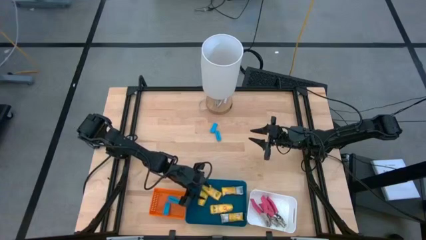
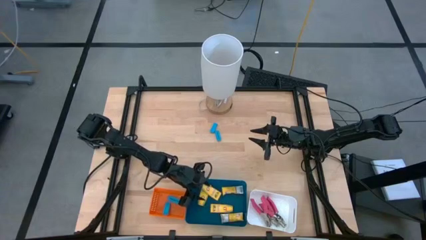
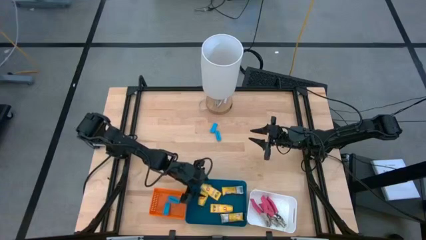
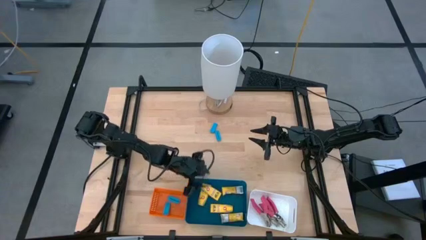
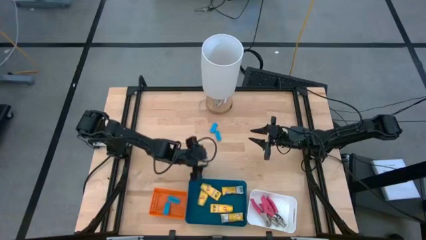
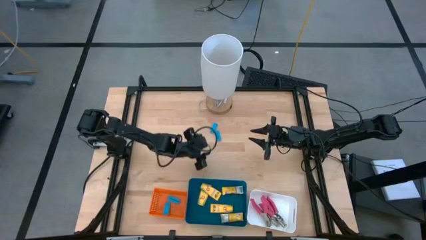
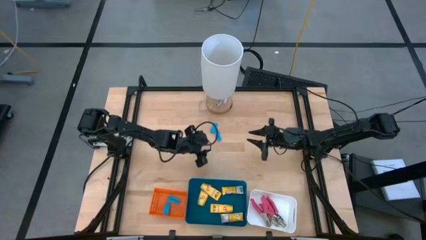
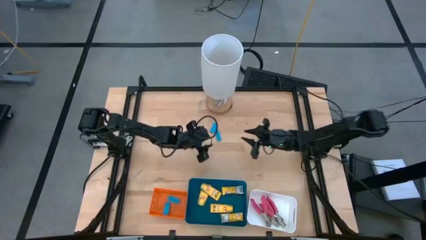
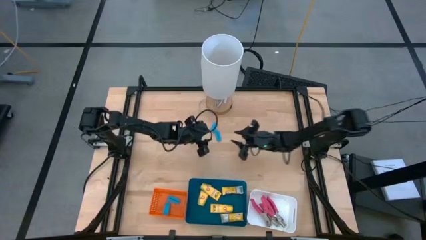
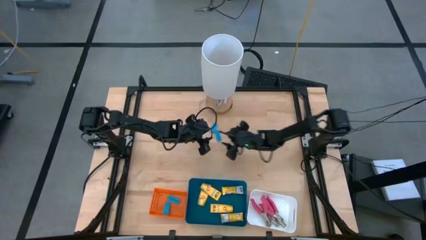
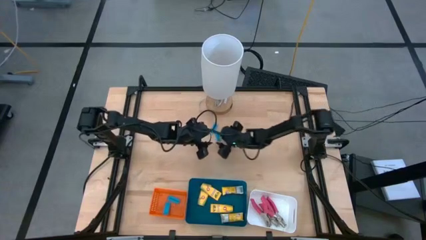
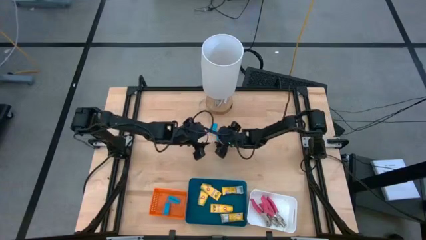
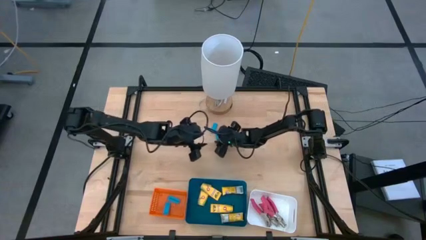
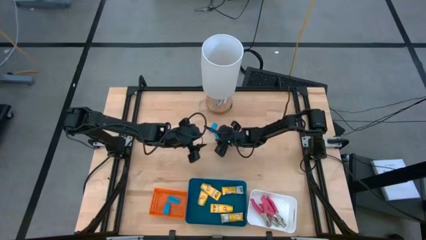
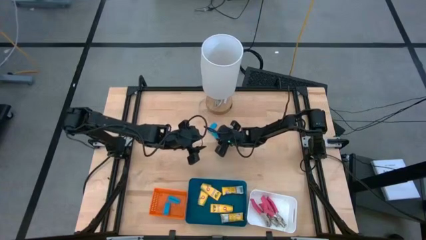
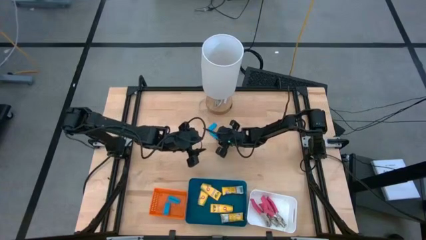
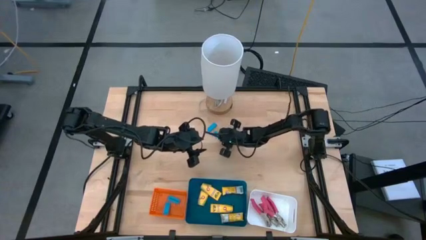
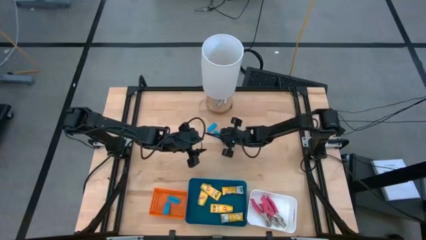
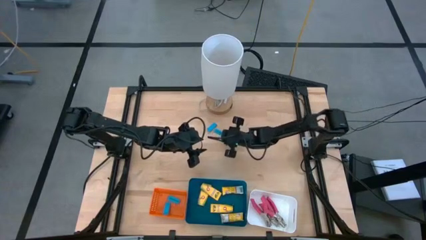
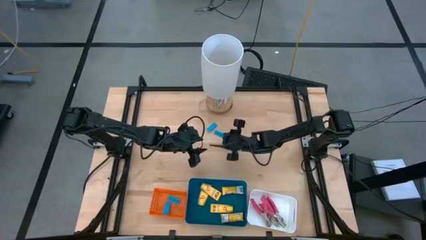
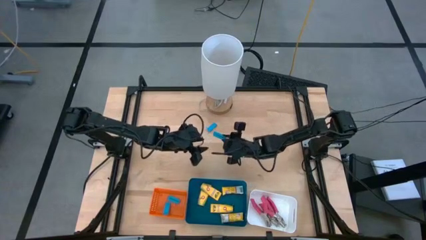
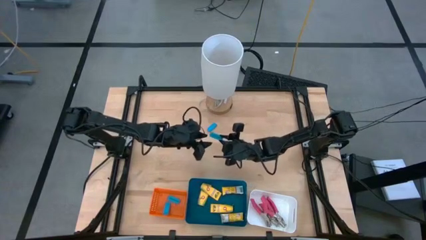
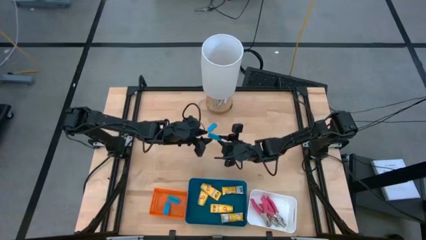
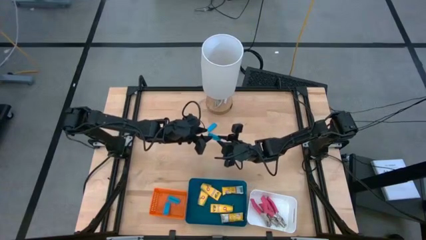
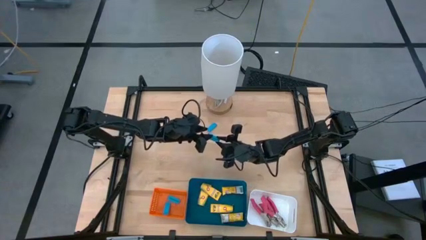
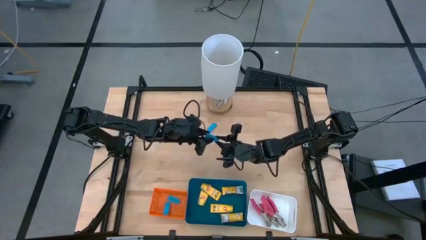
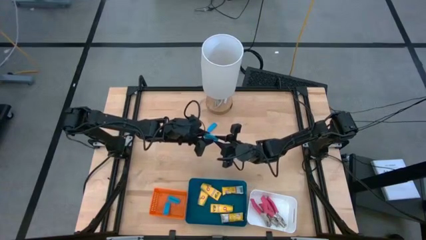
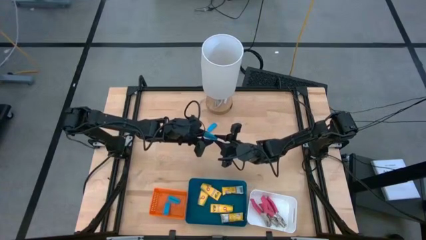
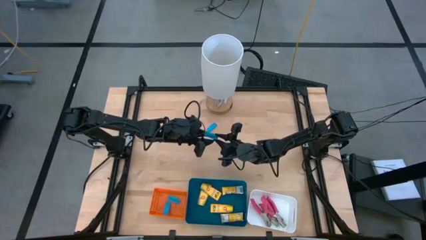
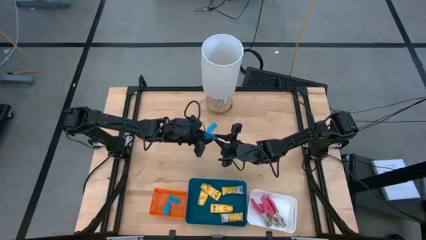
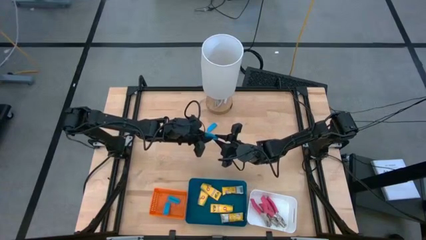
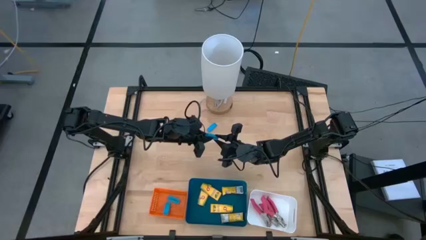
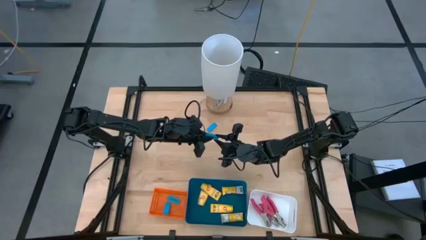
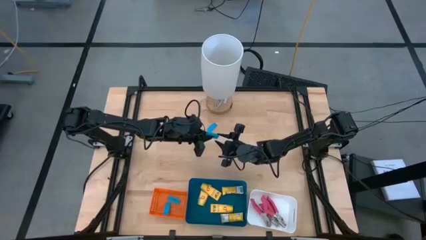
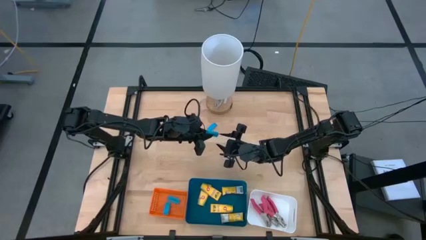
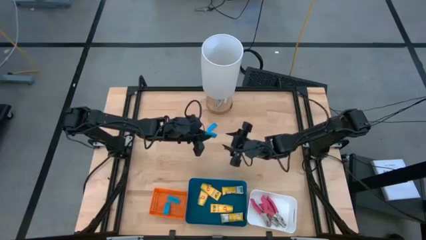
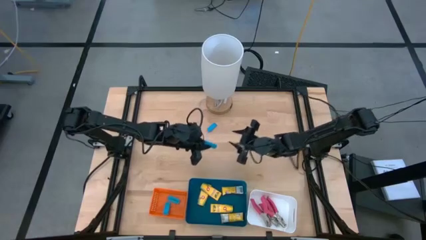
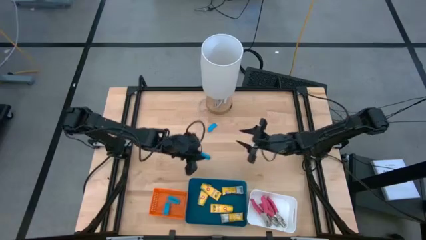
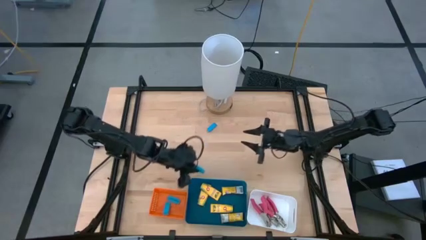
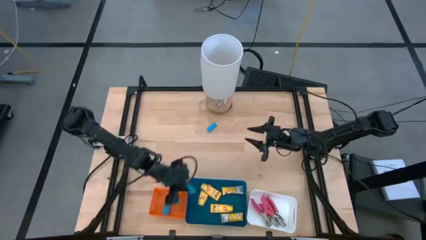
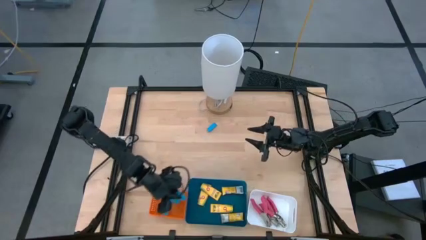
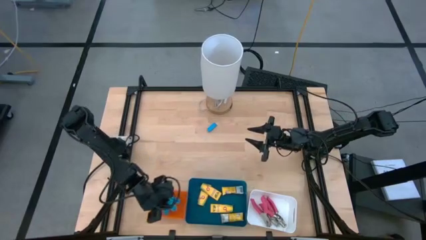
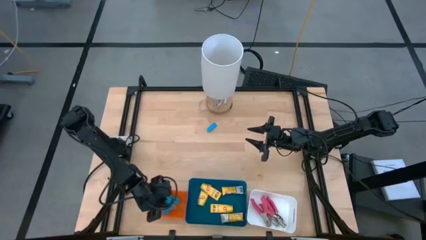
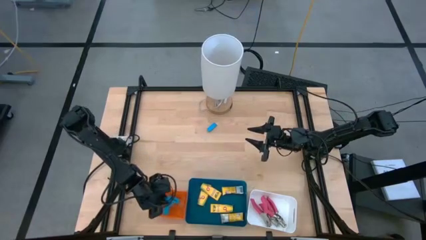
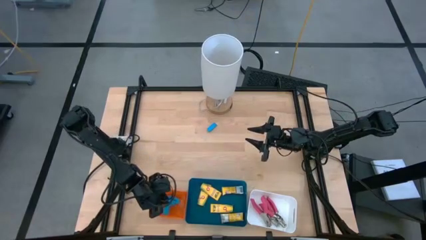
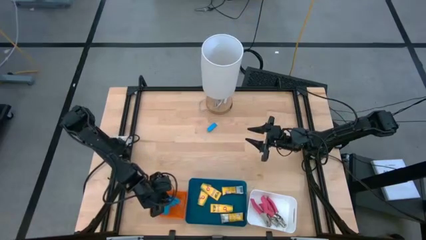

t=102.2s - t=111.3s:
Task: Pick & Place School Supplies
Put the blue eraser into the orange bin

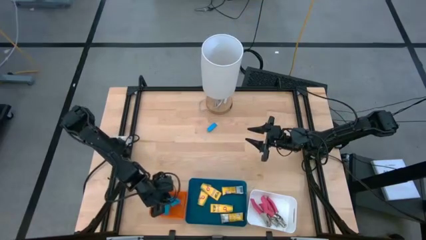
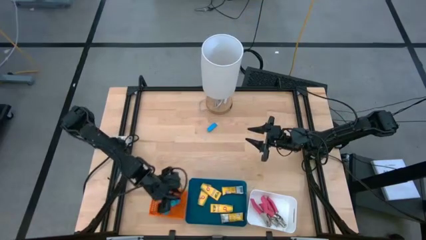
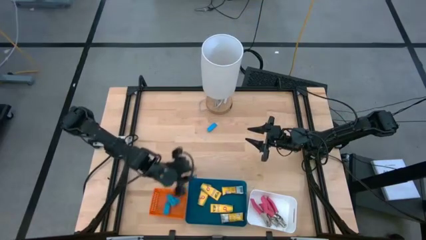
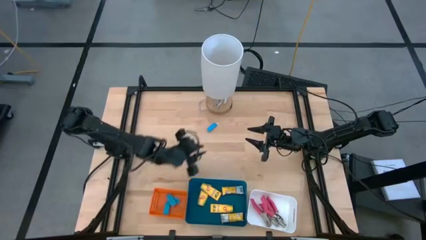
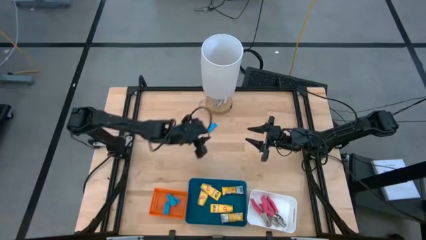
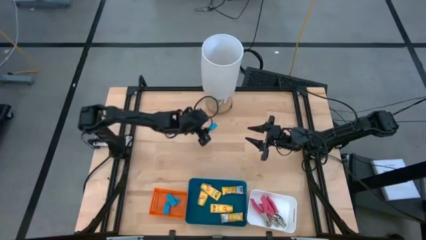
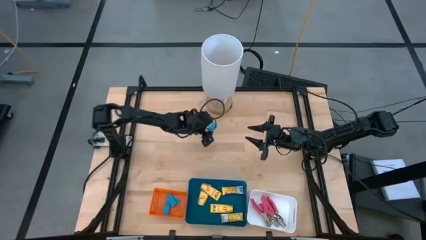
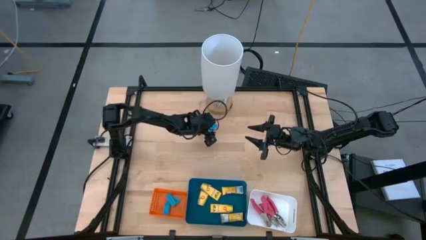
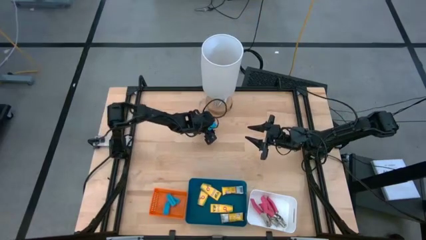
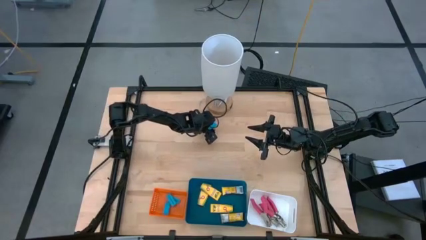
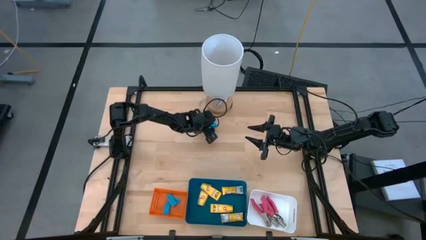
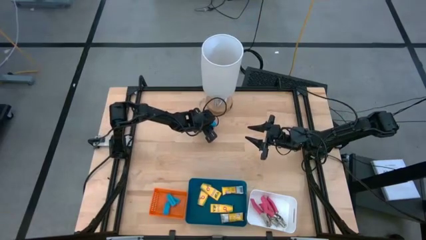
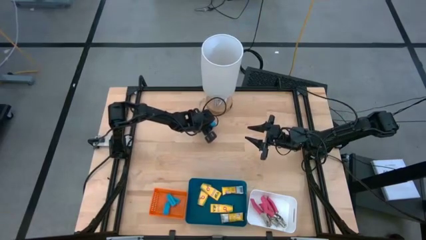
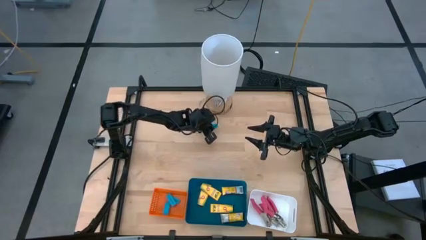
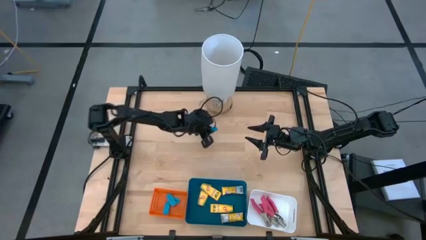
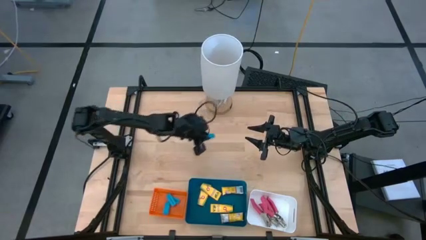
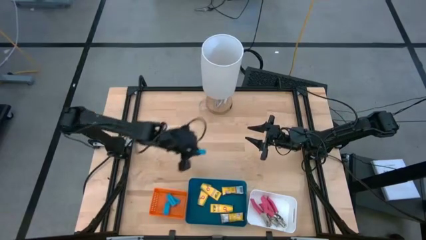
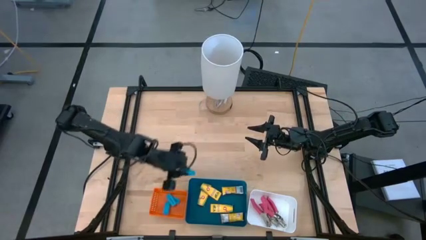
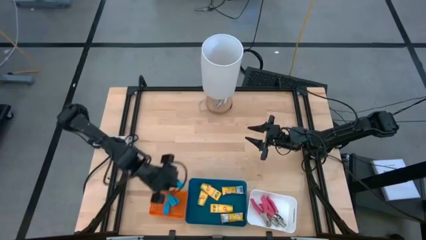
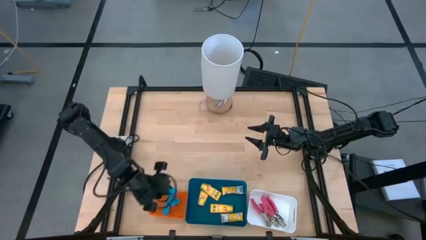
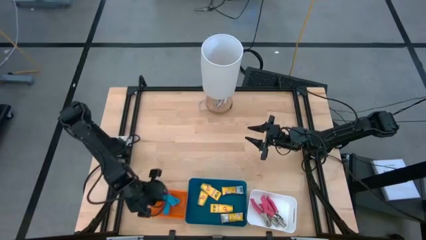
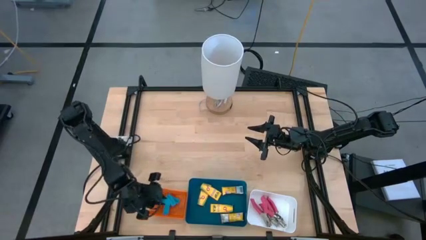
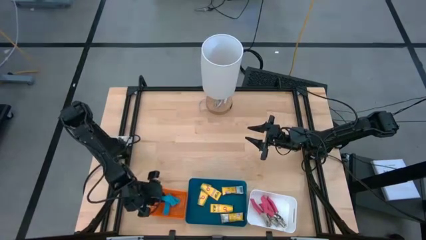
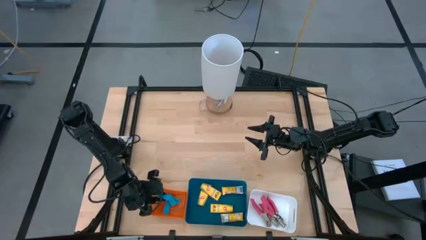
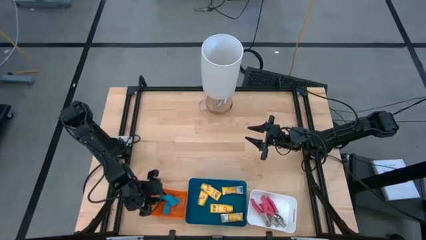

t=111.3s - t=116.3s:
Put the blue eraser into the orange bin

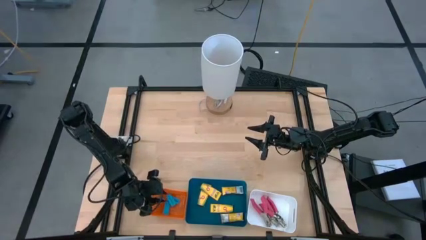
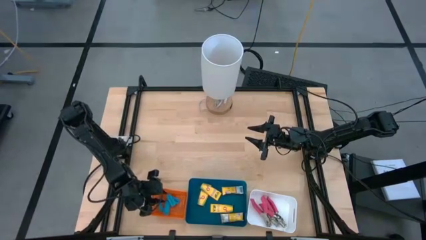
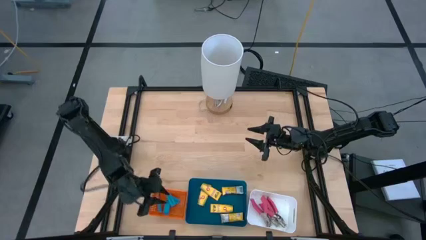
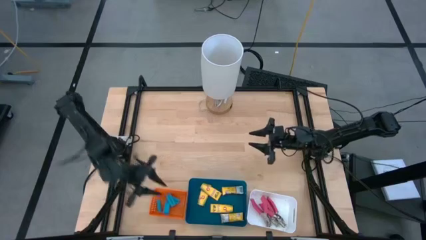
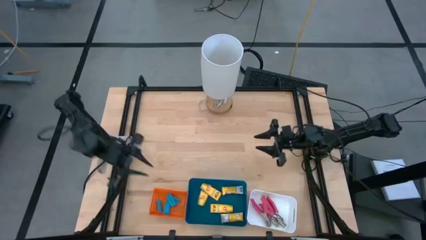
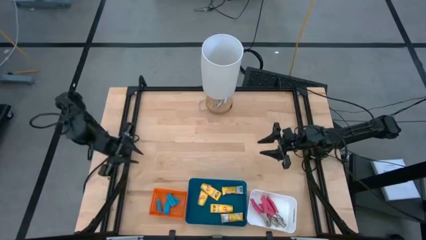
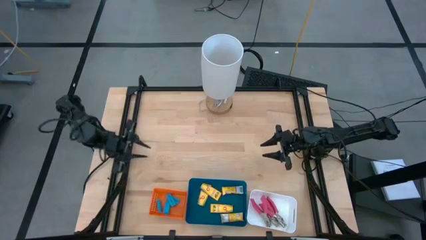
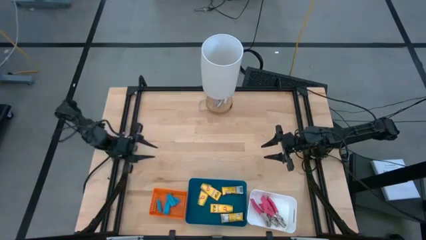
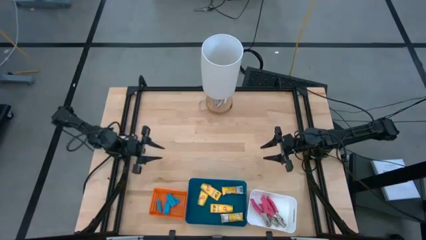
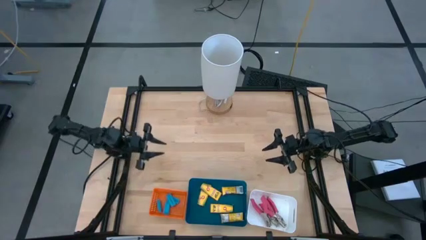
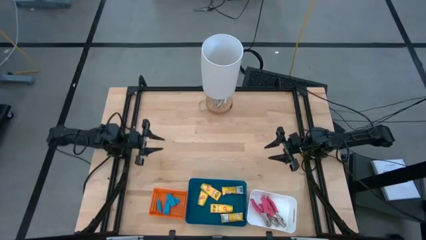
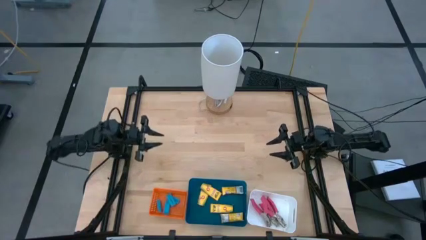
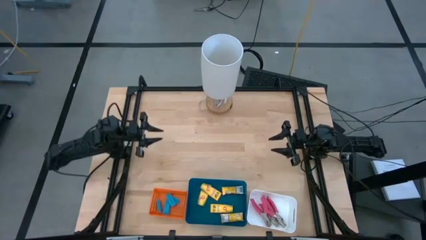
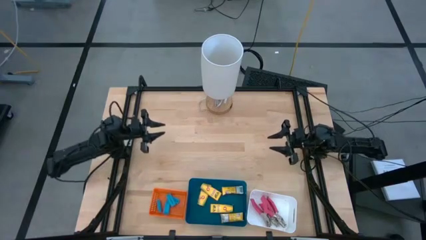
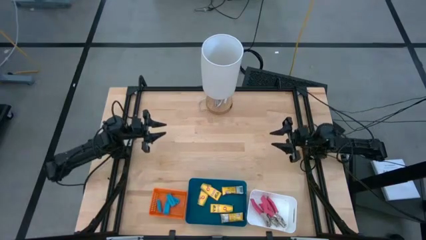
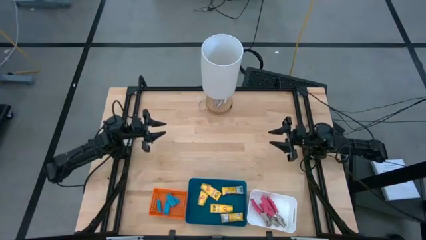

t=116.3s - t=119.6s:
Return to Home Position
